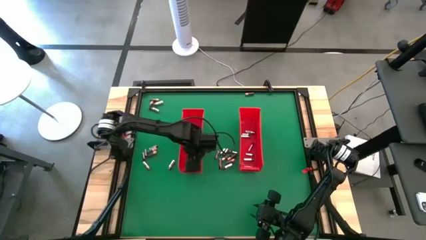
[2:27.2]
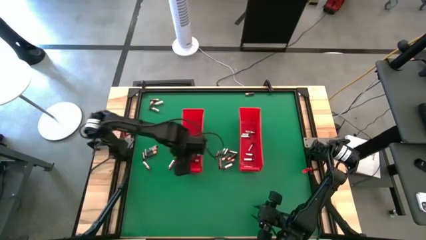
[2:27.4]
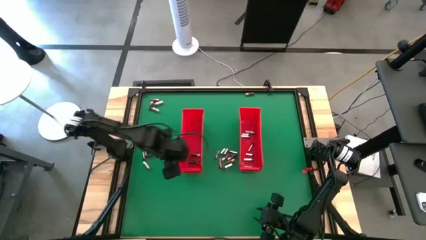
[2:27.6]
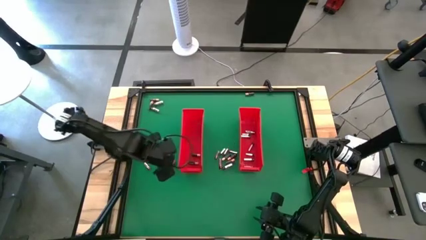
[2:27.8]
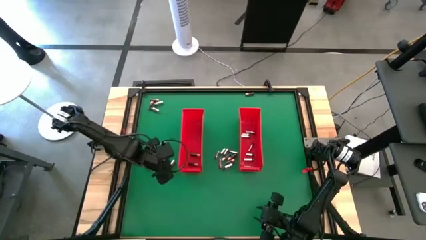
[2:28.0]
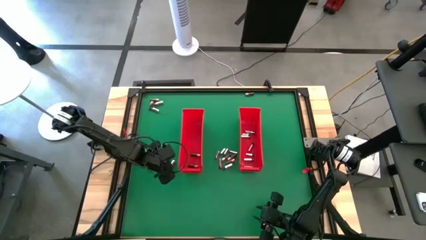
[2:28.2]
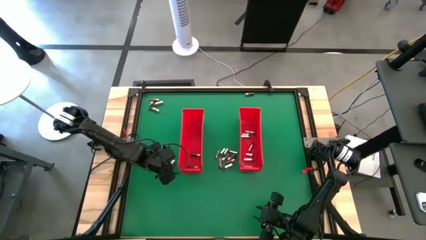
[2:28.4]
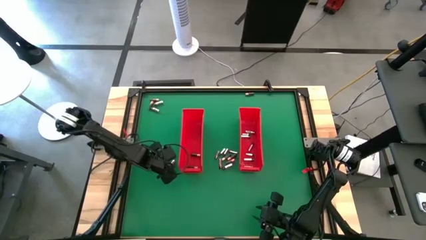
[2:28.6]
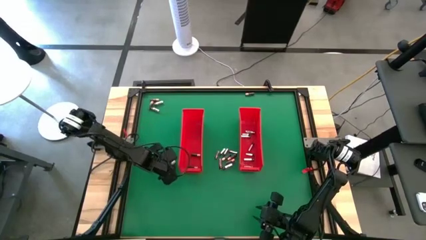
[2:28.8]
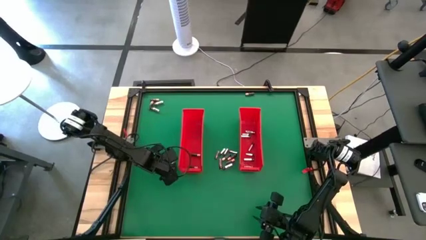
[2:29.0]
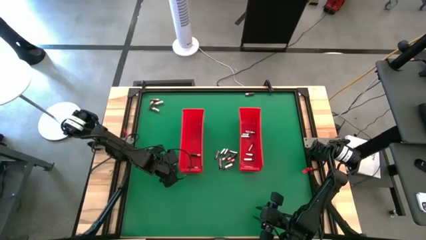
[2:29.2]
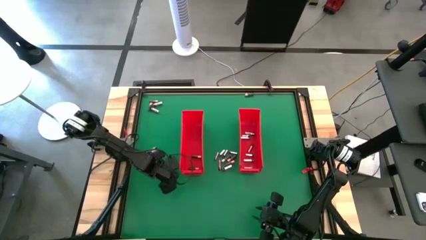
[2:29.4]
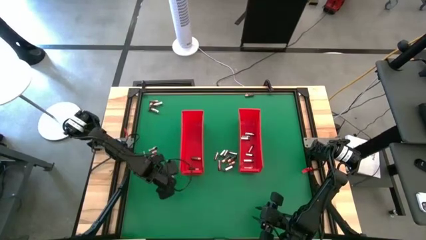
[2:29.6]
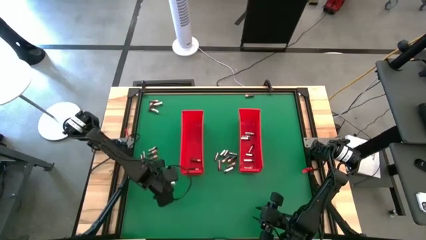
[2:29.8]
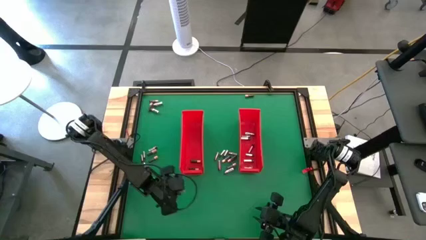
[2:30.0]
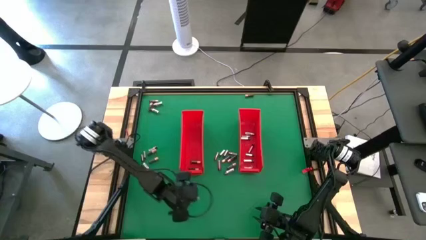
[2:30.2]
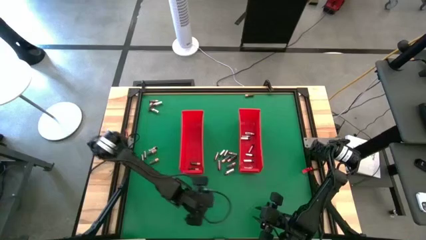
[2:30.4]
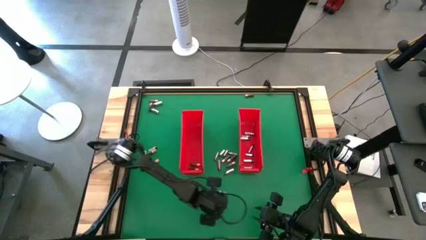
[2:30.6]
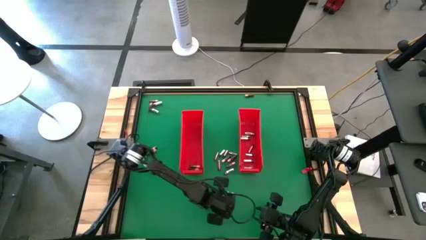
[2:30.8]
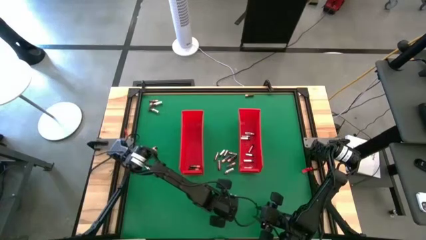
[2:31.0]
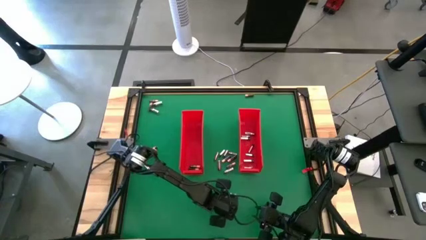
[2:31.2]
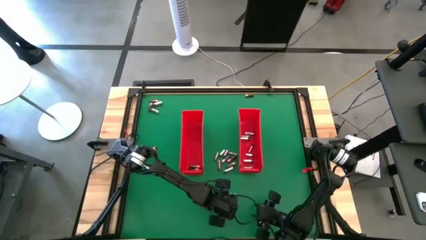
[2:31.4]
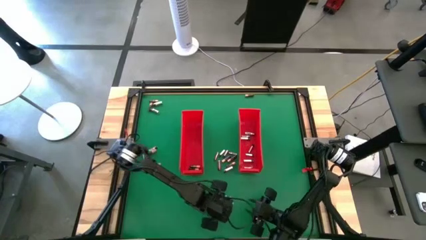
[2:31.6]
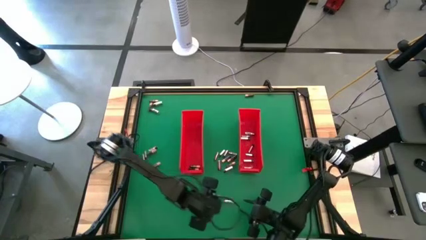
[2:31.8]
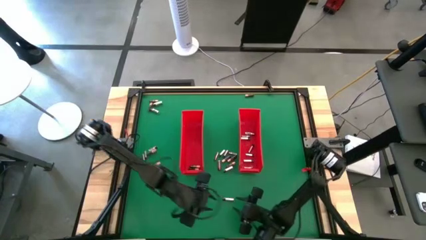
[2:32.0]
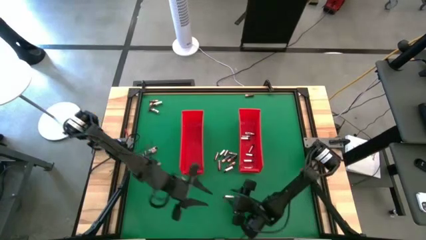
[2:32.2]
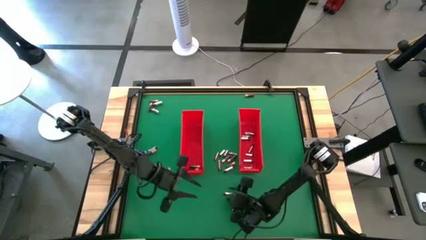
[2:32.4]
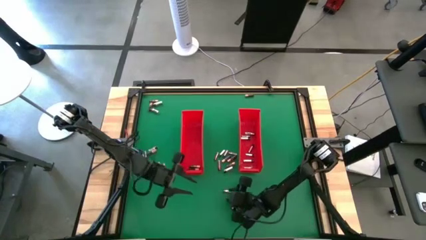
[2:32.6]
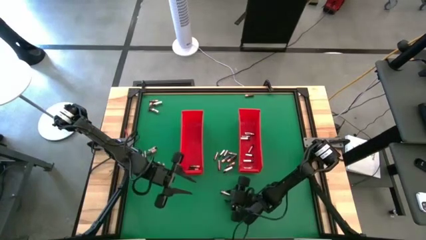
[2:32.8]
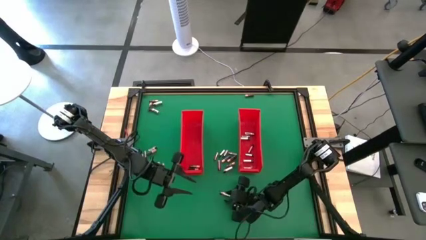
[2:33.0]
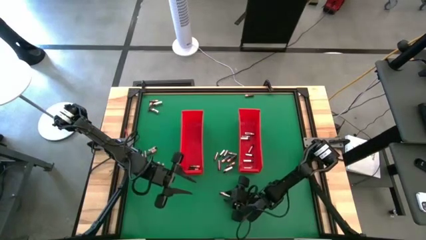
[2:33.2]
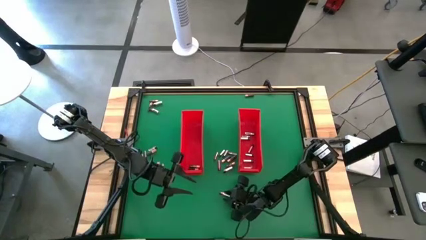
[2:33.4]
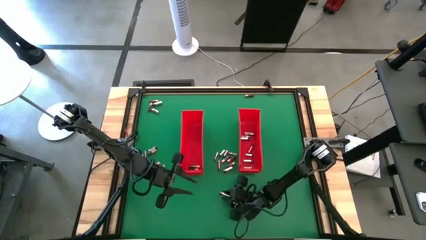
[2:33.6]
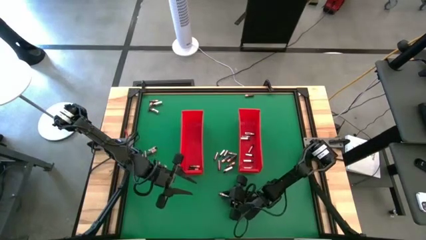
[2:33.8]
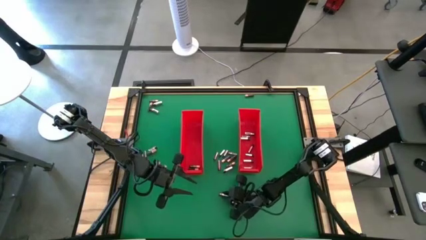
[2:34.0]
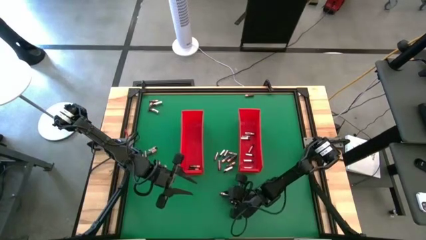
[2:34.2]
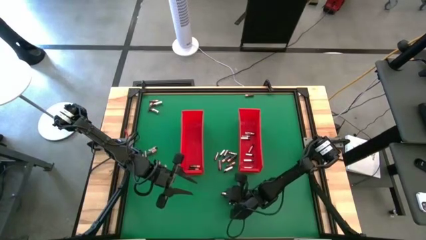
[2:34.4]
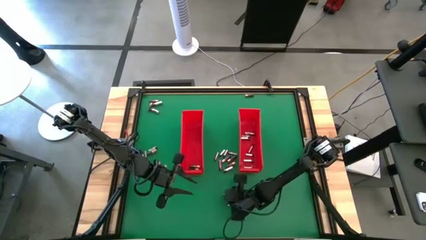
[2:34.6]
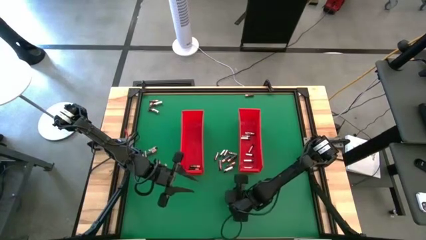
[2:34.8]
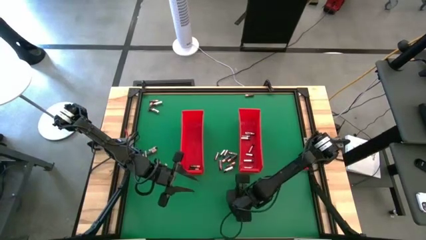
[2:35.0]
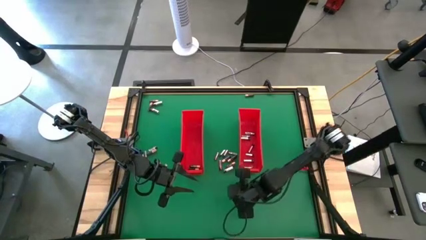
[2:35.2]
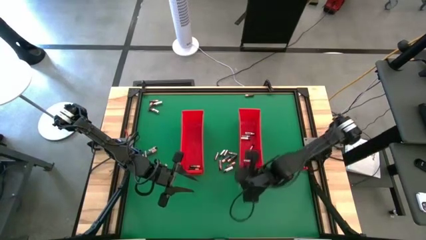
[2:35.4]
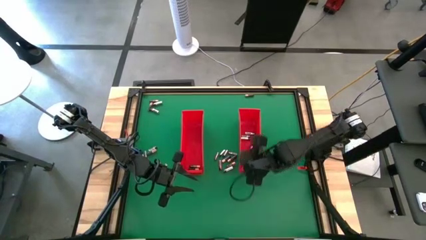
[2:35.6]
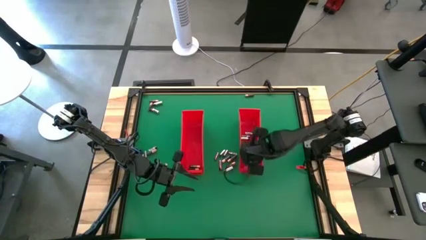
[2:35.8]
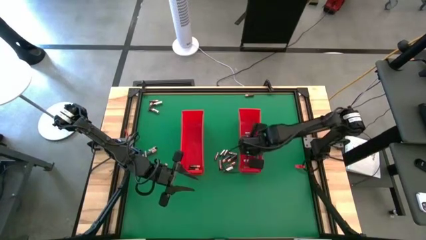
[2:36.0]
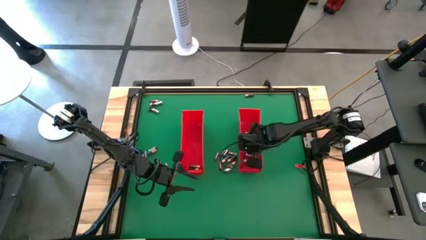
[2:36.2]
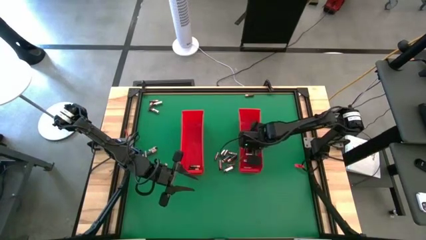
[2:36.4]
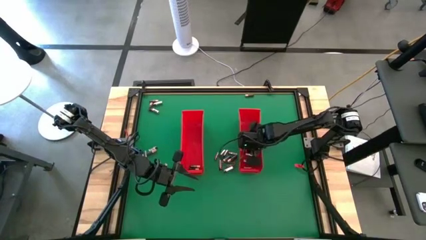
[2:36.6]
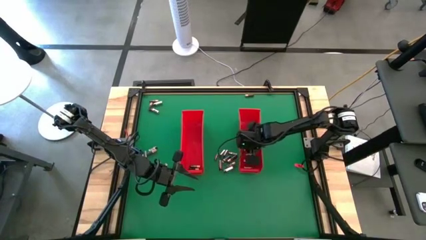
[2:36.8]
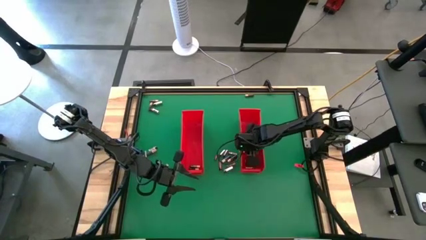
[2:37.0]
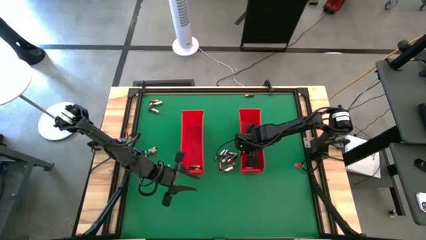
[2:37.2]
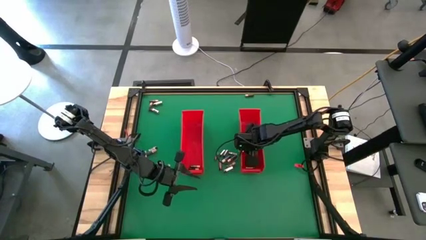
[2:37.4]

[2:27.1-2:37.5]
Task: Sort batteries
Put the silver battery into the right red bin
